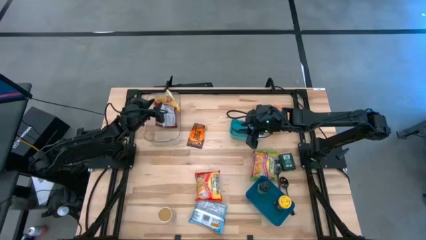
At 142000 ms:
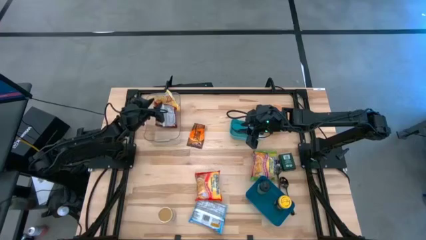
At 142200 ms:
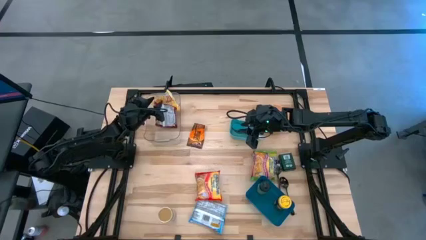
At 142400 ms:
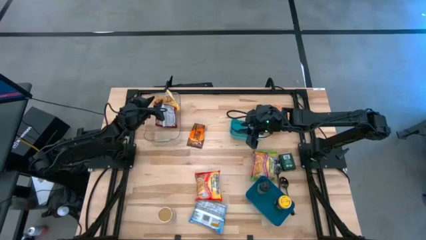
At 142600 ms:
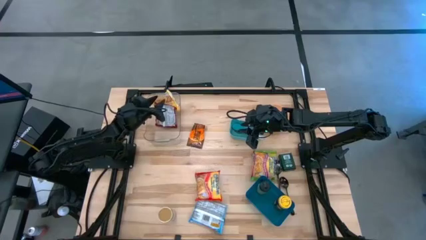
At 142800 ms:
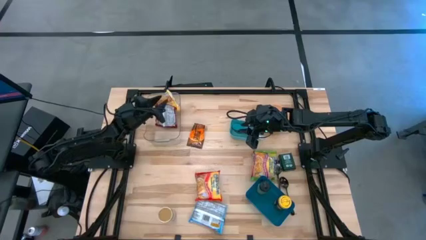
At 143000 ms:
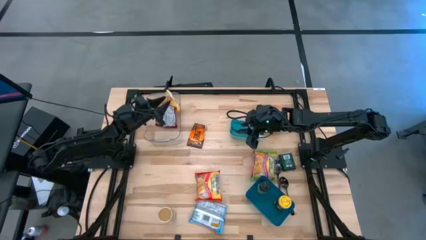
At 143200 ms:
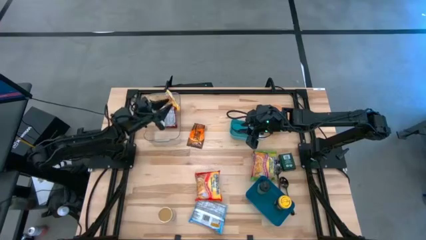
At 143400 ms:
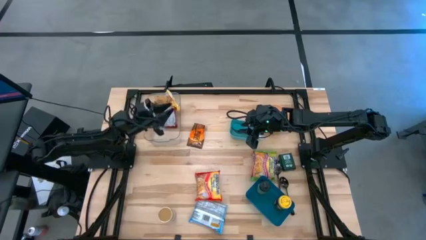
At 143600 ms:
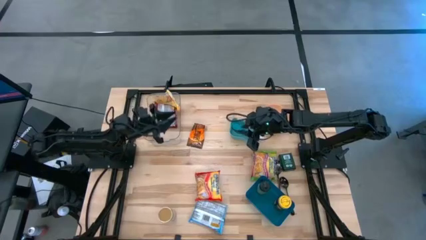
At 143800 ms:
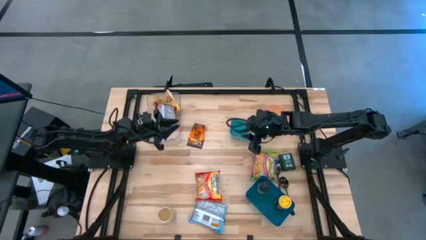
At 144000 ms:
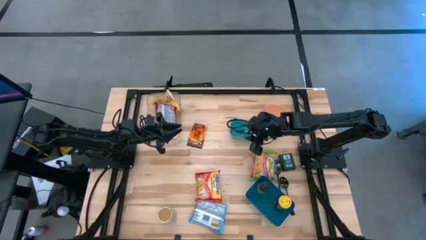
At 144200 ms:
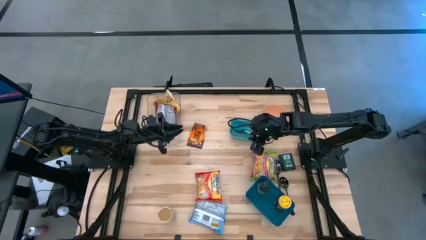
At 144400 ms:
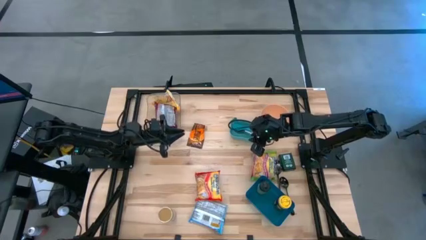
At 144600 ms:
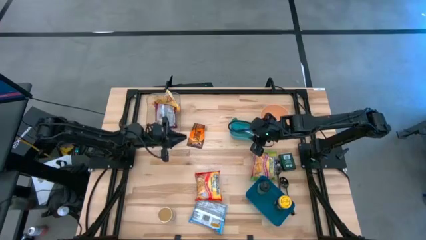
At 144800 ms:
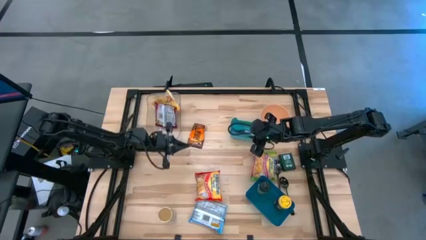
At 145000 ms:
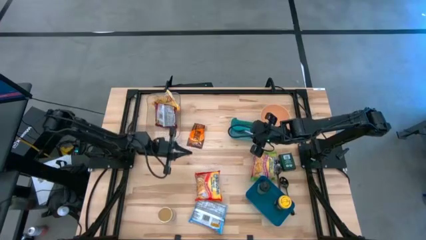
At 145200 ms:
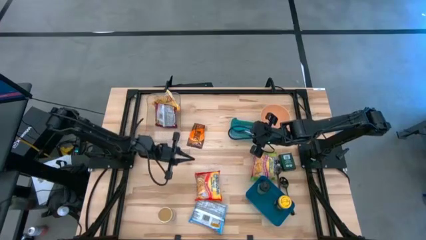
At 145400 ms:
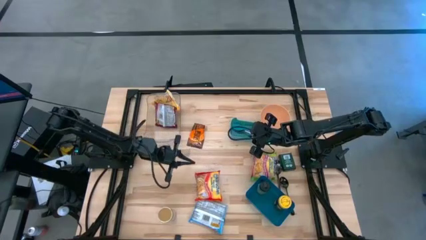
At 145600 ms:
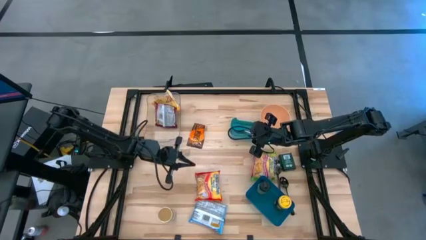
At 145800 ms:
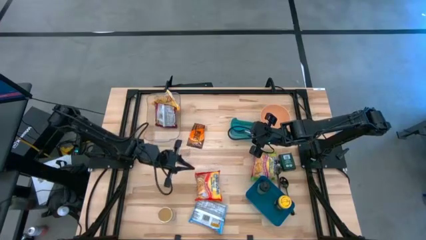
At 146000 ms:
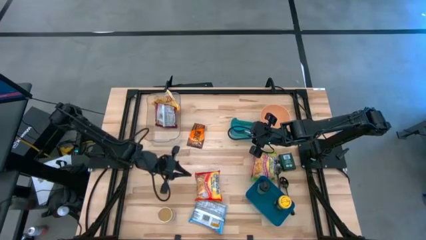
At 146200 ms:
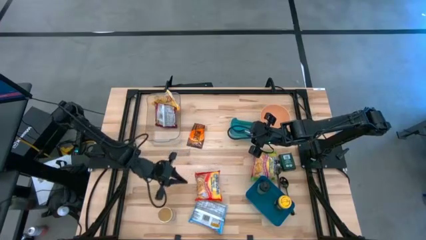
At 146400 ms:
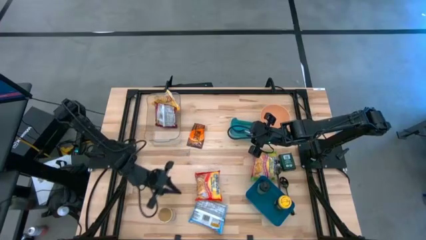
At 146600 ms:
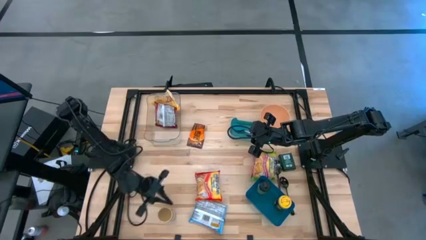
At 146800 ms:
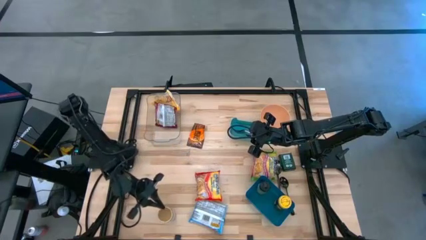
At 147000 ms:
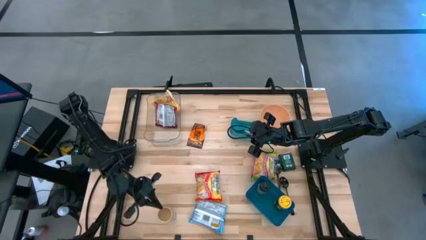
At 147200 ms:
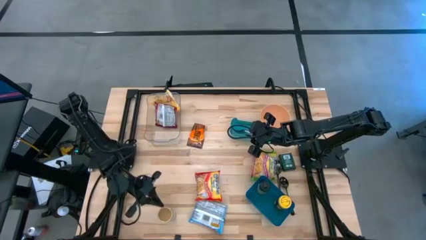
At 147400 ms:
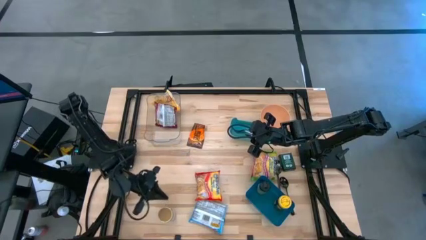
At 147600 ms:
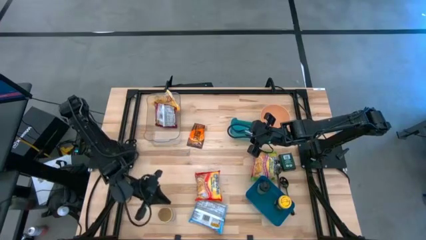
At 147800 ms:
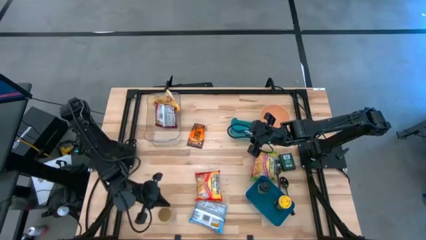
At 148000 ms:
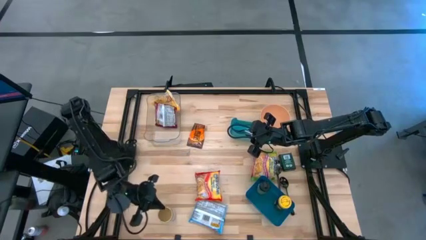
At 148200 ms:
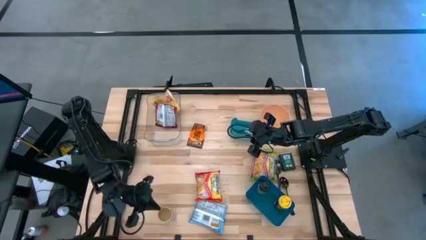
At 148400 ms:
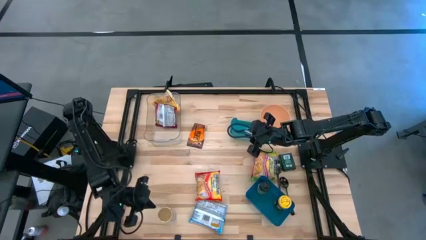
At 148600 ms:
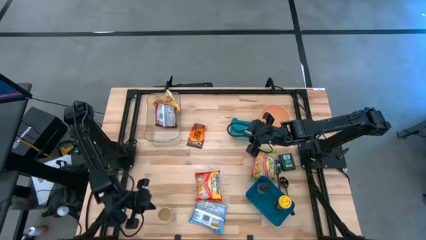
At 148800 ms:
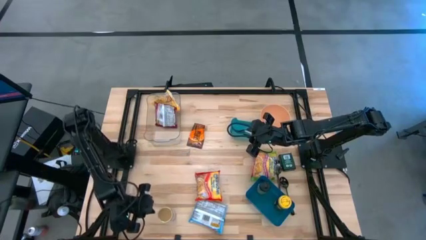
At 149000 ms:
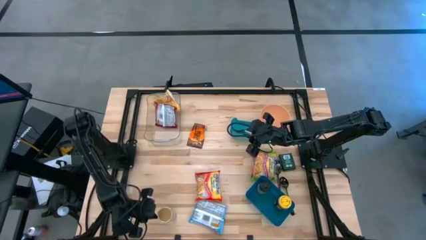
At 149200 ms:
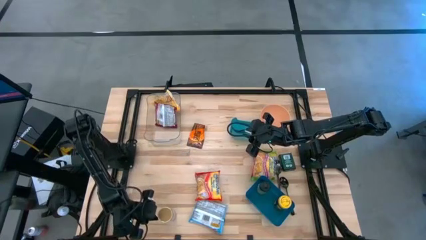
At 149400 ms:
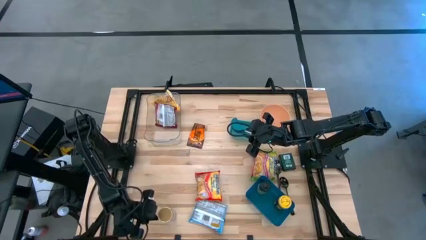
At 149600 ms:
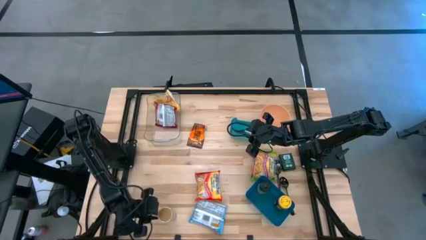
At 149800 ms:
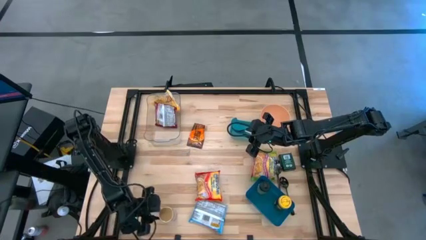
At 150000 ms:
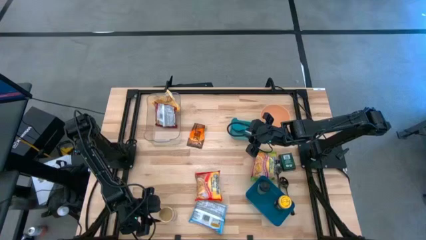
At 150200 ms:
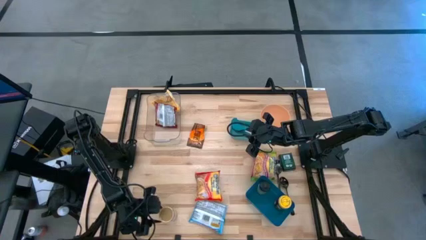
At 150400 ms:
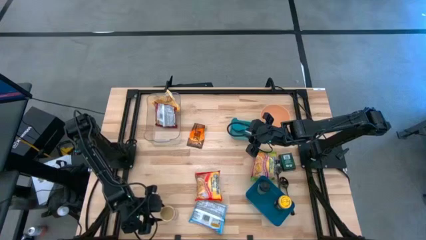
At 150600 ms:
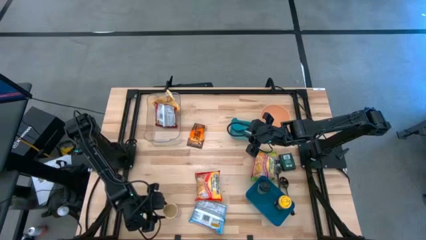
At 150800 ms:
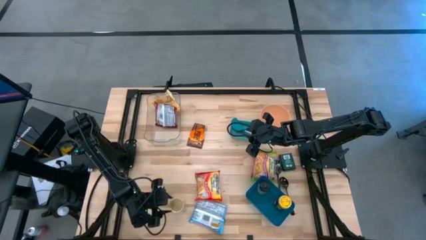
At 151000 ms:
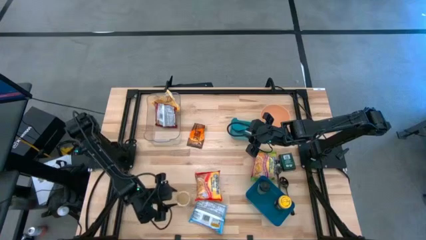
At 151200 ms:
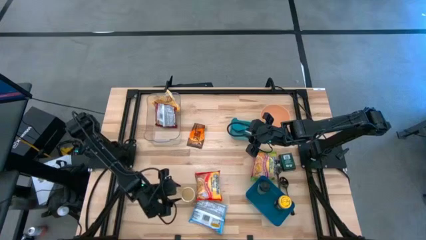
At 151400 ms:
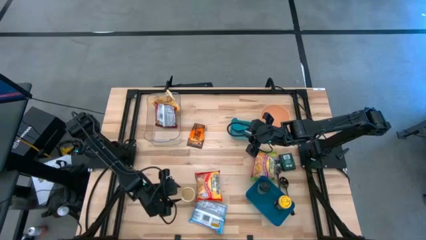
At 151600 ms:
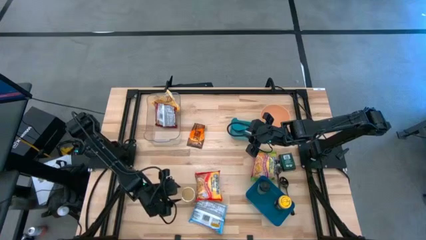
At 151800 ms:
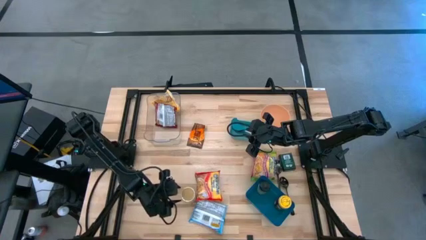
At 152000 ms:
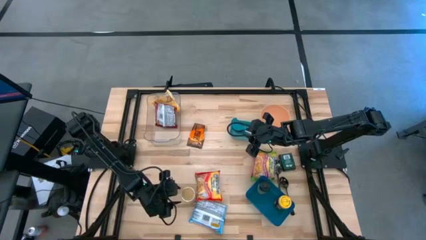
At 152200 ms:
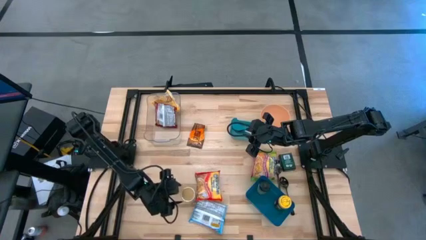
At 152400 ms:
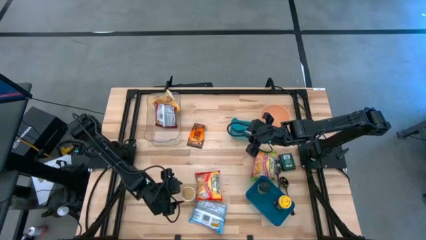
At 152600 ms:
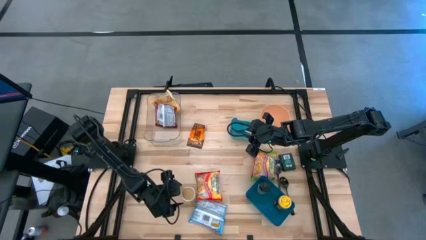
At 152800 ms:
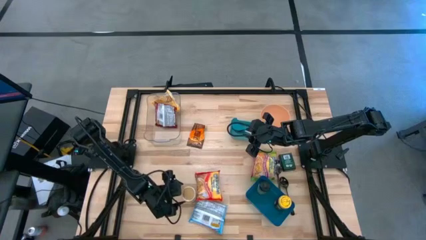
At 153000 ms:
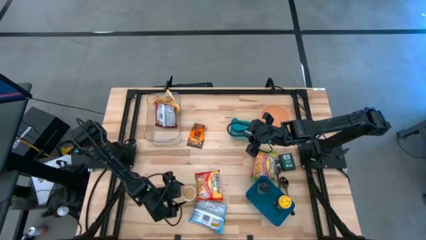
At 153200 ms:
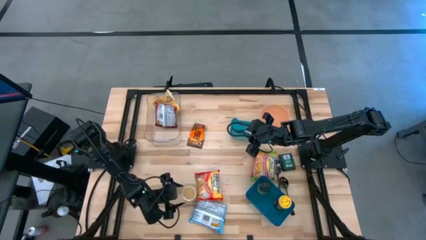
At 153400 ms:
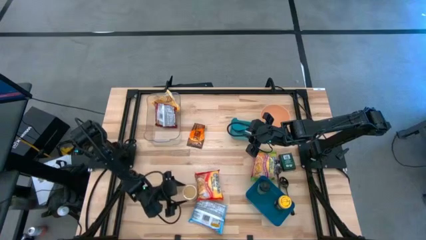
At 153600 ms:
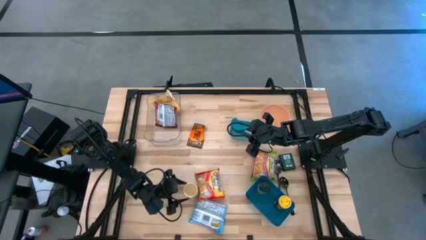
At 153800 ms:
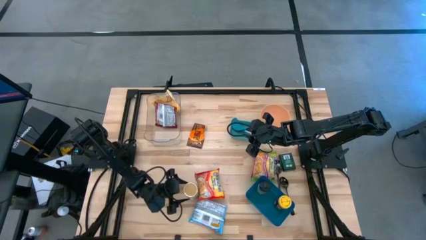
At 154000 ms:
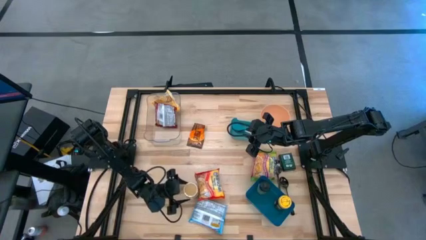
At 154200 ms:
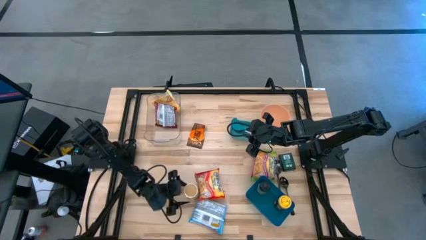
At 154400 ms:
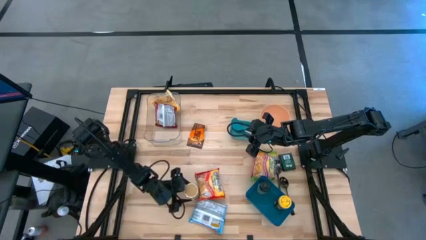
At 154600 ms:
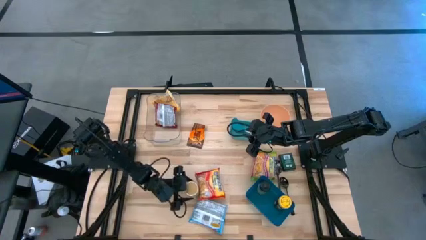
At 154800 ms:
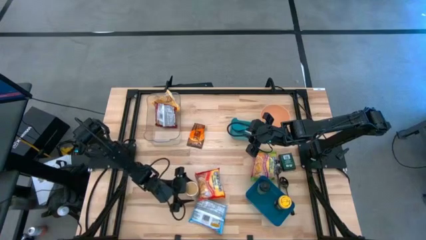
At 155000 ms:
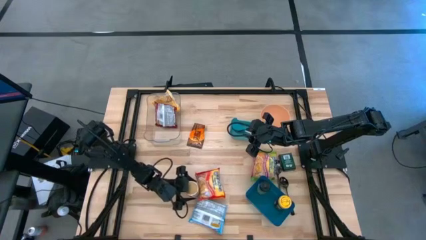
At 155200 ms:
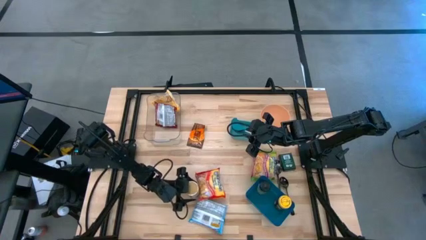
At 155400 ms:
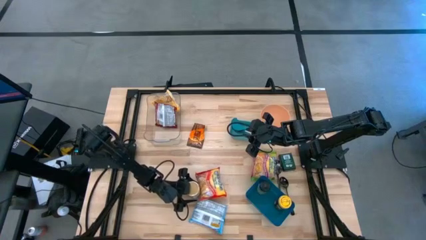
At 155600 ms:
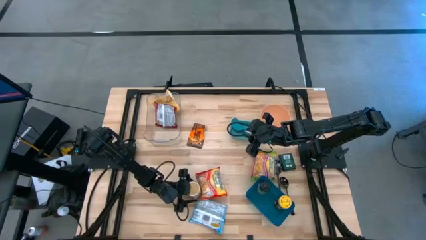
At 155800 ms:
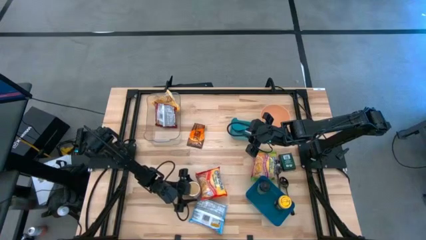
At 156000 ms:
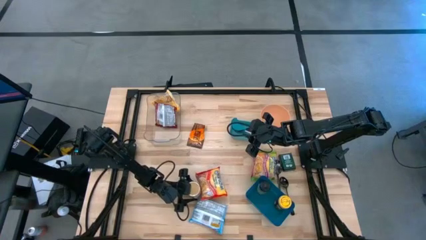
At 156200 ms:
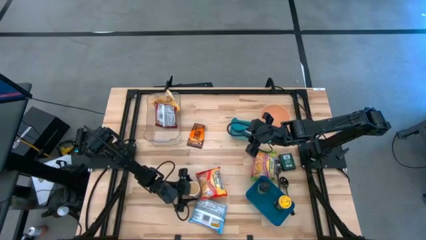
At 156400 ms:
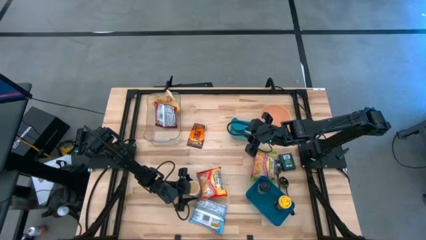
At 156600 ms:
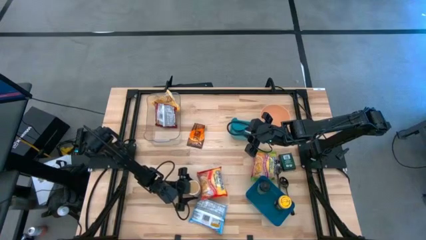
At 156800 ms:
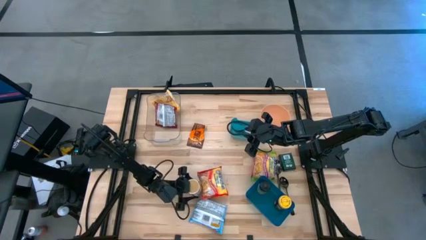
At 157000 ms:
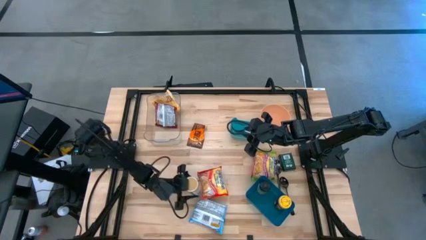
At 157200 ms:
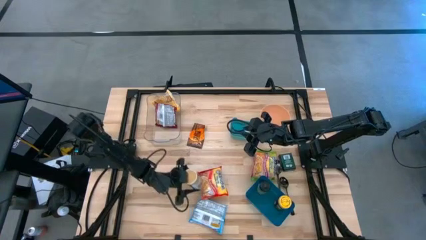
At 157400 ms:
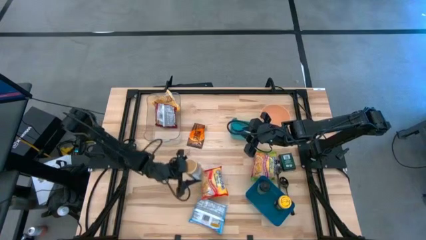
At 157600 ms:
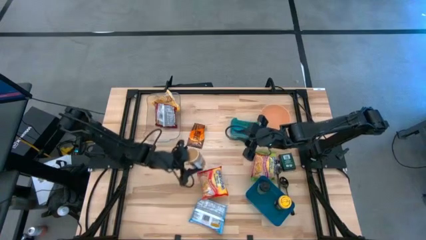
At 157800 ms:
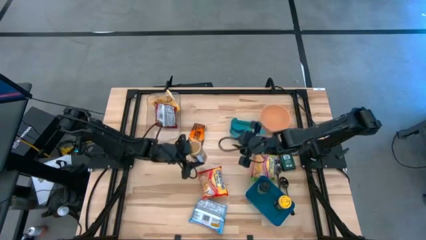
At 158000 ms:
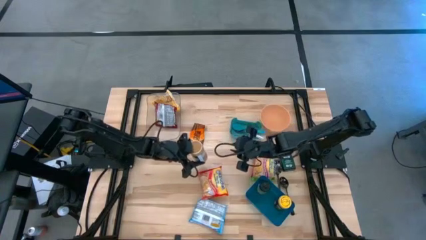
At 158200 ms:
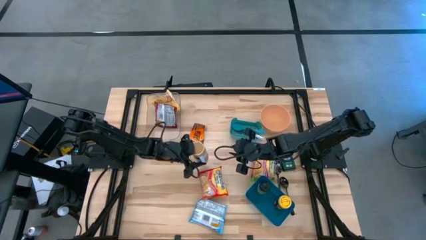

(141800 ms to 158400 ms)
Task: Pick & Place Food Item
Put the gold seasoning bottle into the blue bin
